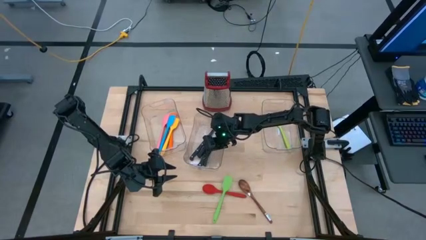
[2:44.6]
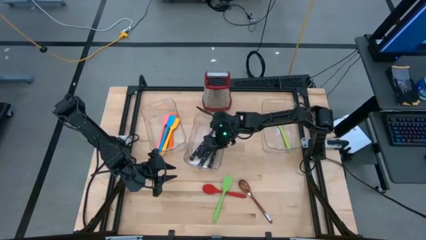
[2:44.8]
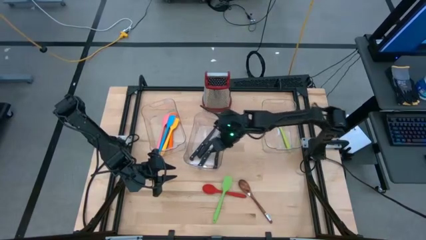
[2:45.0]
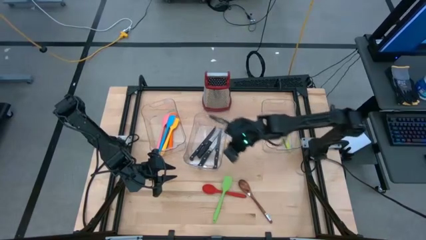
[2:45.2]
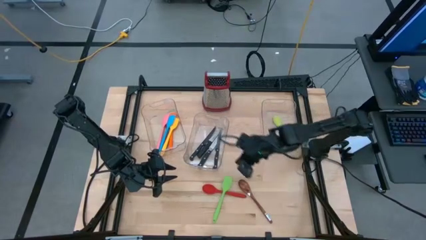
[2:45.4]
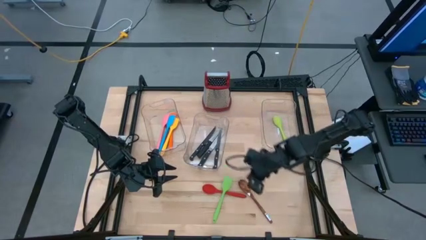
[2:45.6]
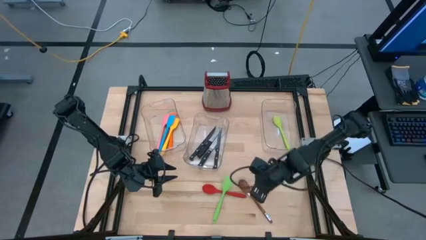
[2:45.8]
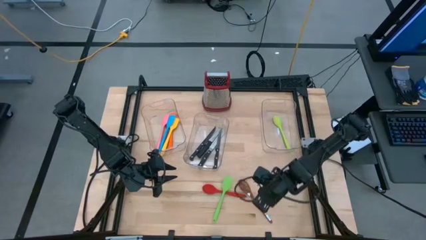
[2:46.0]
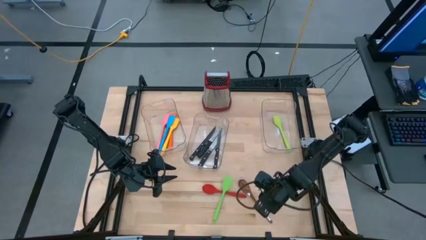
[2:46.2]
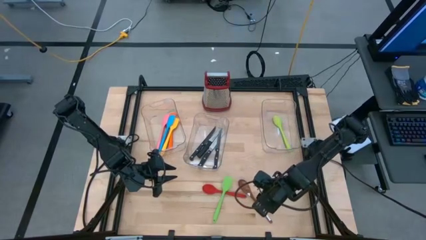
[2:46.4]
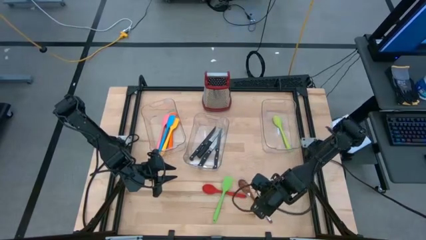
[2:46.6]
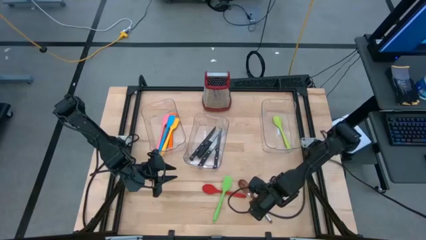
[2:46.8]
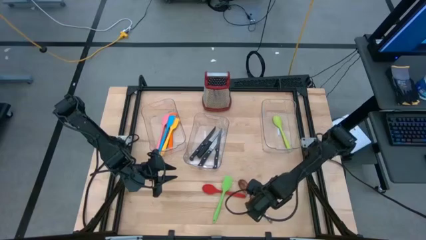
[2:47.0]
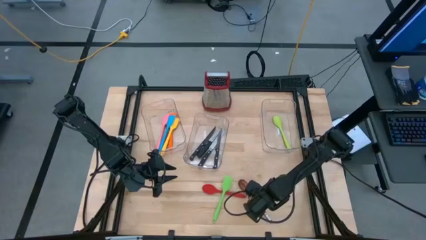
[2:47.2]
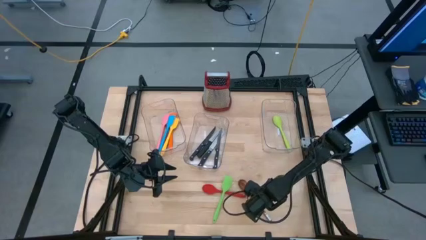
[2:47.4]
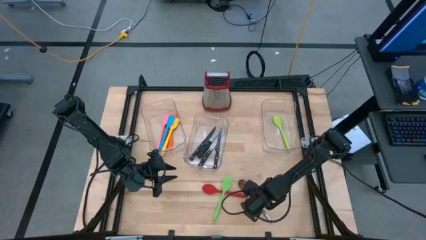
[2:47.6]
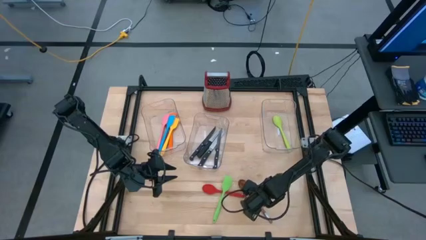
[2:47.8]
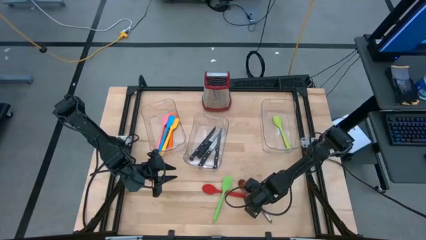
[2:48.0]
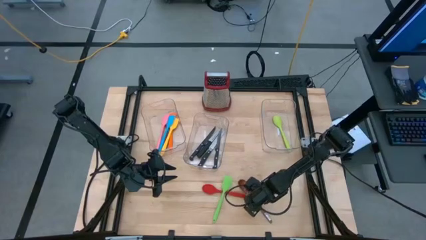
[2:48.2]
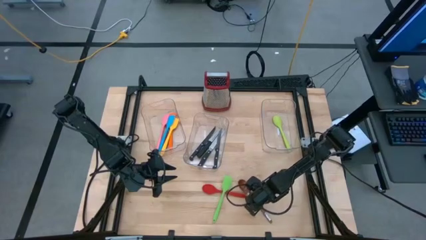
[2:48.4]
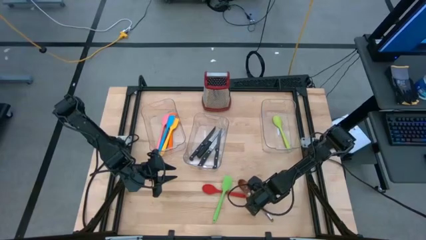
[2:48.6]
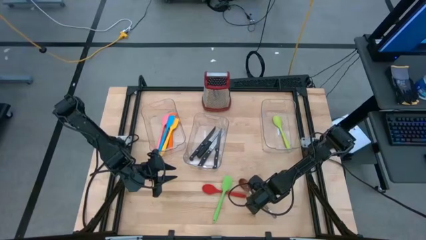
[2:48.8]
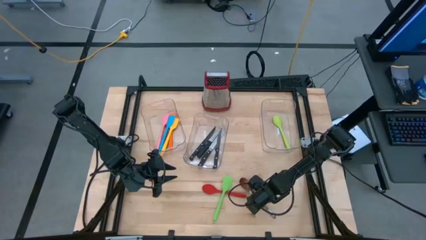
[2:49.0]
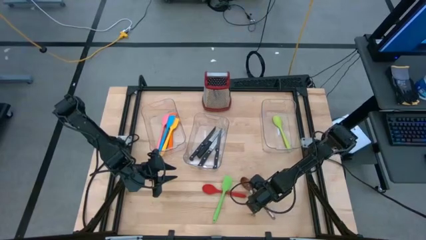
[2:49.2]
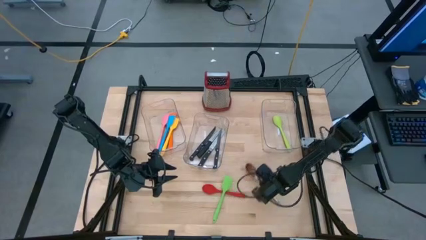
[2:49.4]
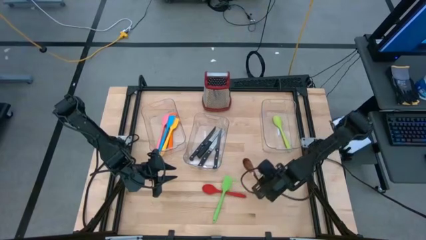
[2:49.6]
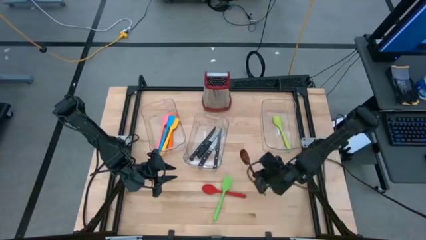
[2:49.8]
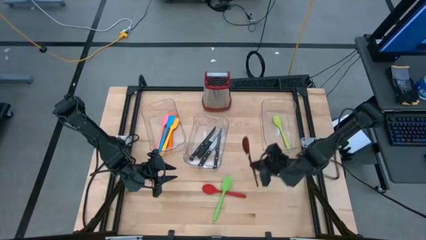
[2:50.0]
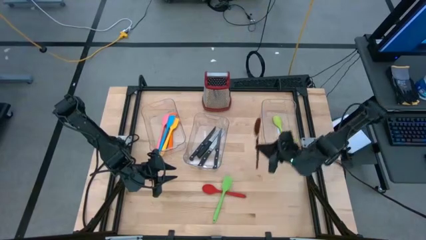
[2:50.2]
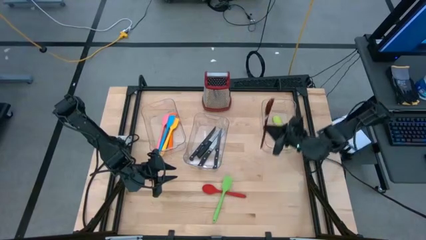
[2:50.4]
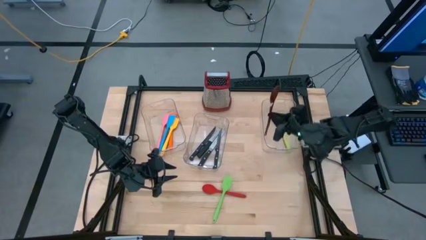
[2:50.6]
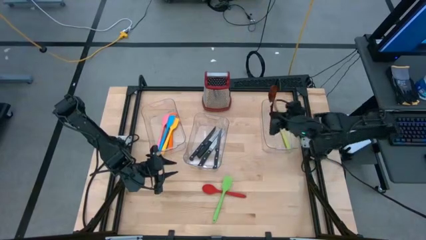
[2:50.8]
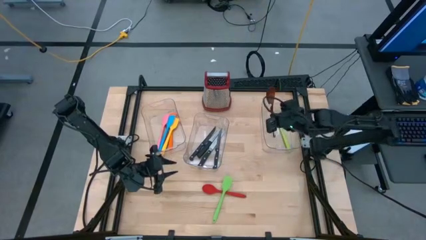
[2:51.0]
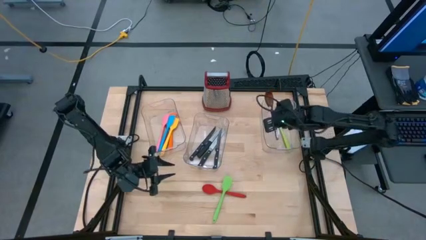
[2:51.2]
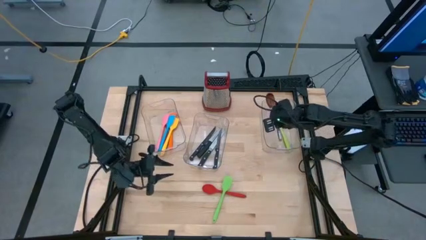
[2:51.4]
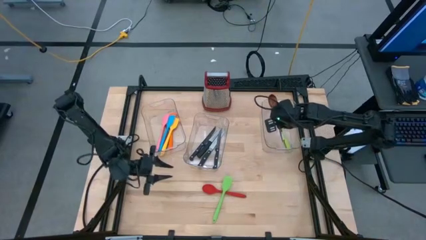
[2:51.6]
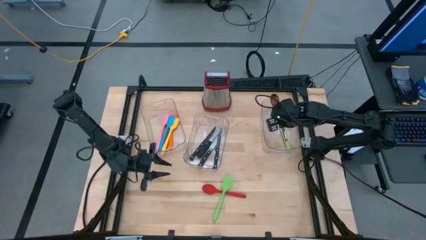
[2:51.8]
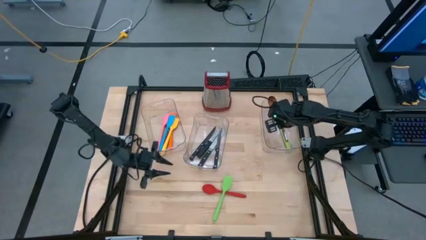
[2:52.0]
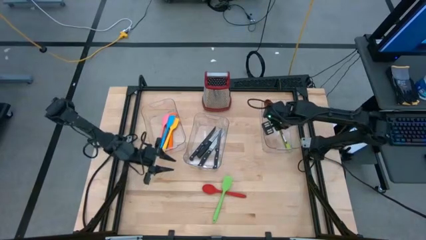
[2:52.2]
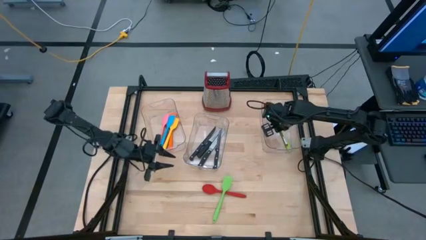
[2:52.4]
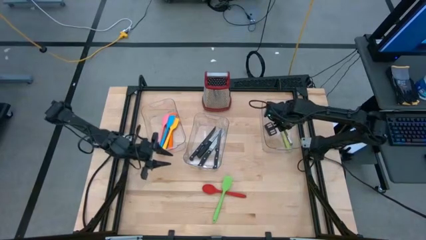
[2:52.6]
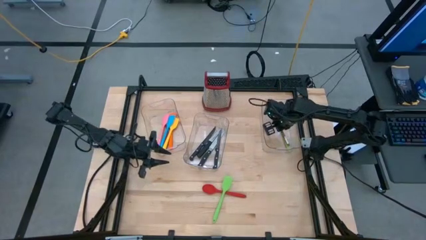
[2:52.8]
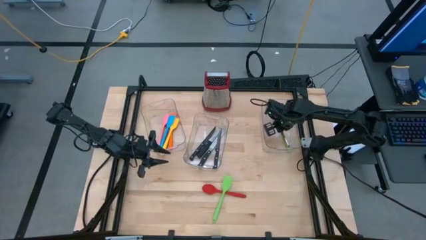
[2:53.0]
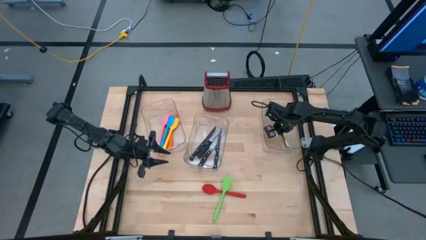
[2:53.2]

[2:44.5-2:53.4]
Task: Pick & Place Kitchen Items
Put the brown serving spoon into the right transparent bin

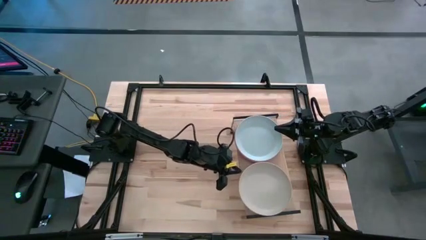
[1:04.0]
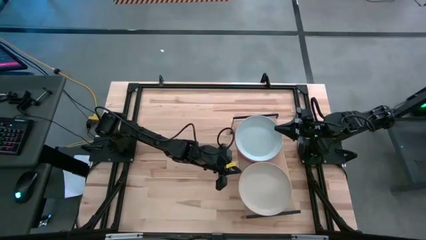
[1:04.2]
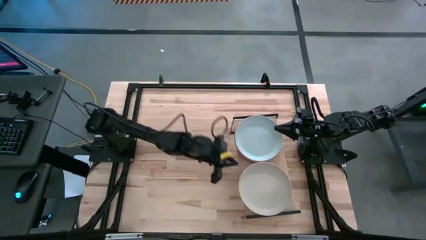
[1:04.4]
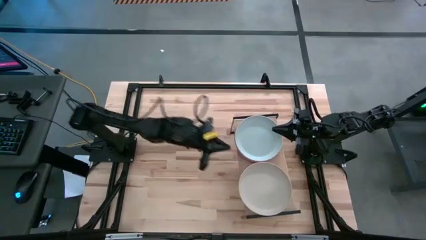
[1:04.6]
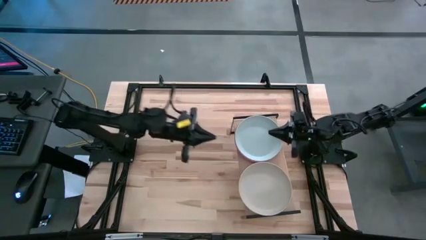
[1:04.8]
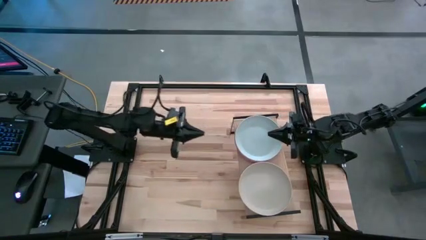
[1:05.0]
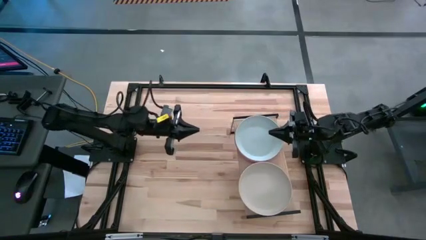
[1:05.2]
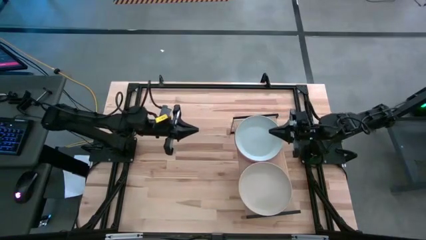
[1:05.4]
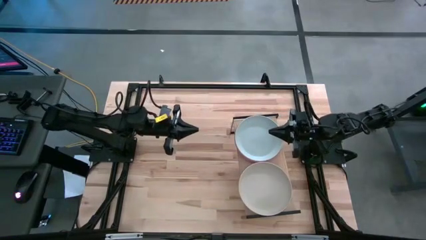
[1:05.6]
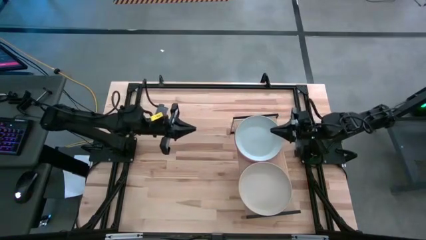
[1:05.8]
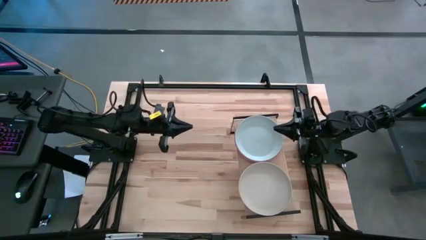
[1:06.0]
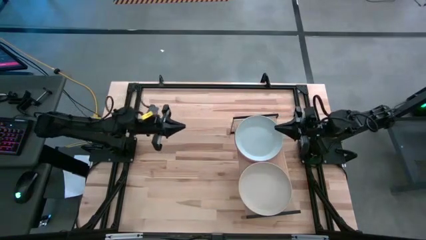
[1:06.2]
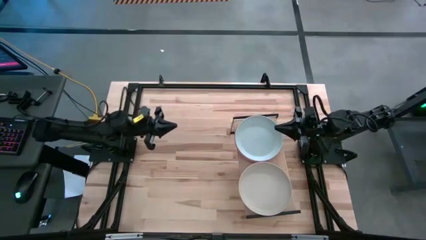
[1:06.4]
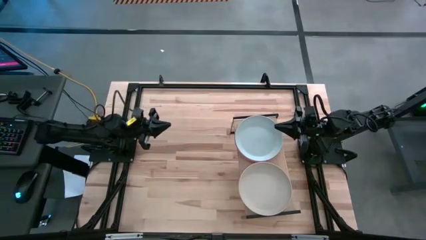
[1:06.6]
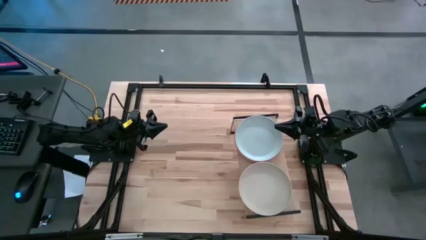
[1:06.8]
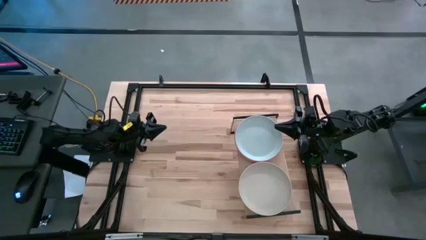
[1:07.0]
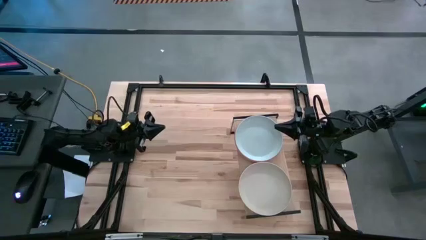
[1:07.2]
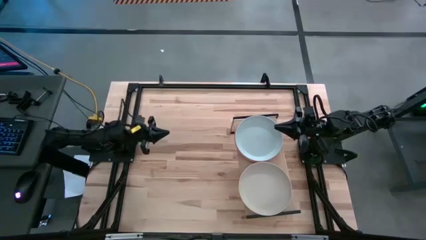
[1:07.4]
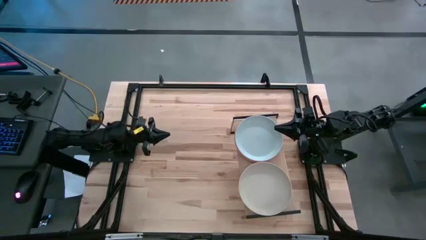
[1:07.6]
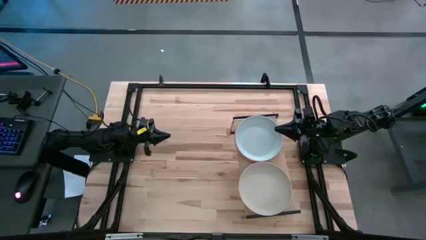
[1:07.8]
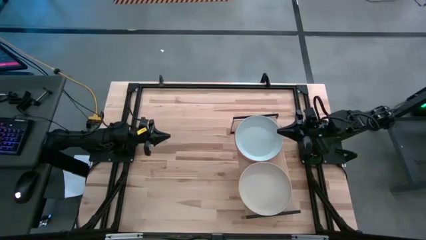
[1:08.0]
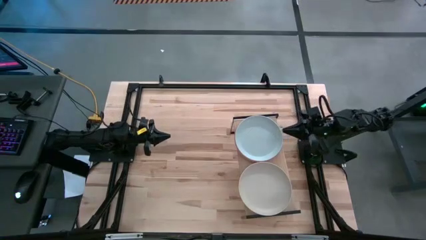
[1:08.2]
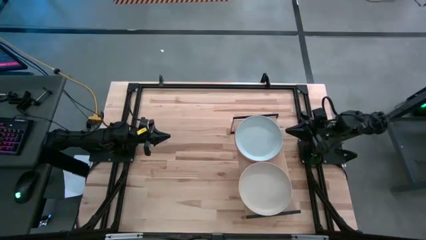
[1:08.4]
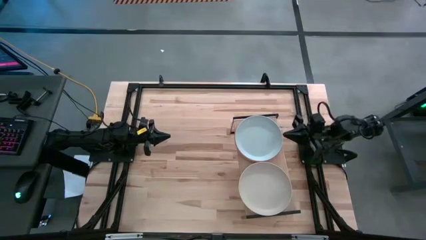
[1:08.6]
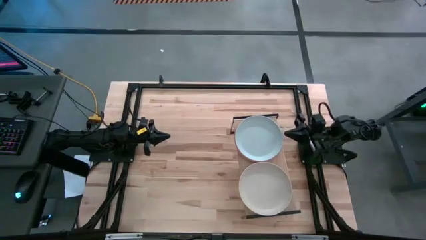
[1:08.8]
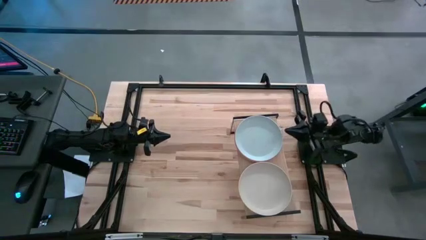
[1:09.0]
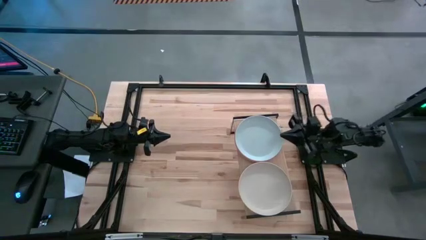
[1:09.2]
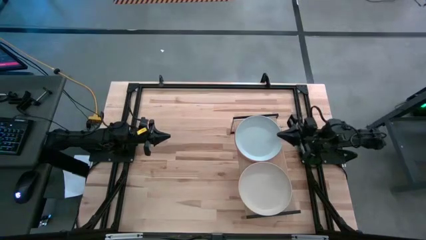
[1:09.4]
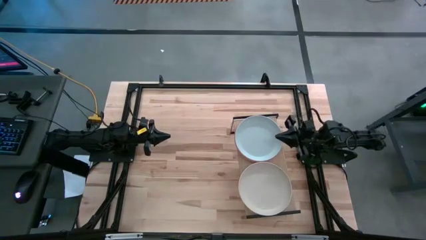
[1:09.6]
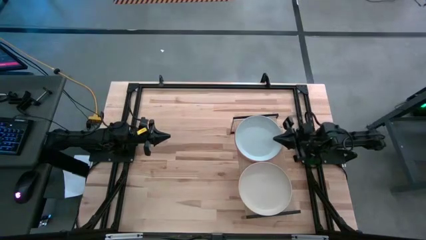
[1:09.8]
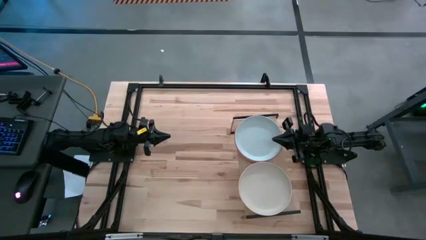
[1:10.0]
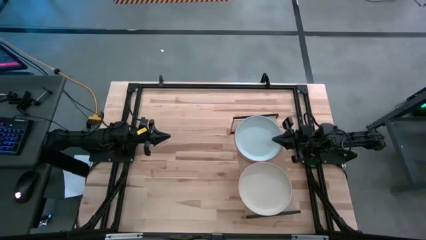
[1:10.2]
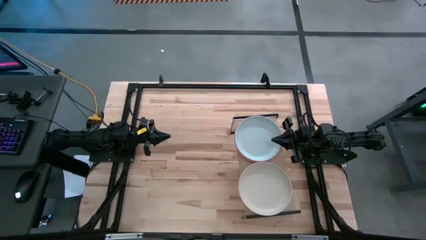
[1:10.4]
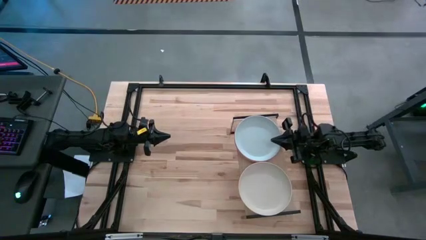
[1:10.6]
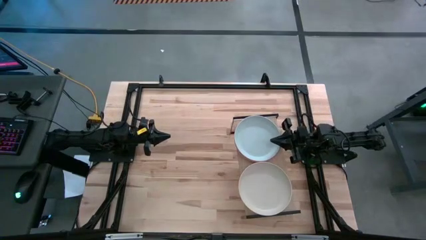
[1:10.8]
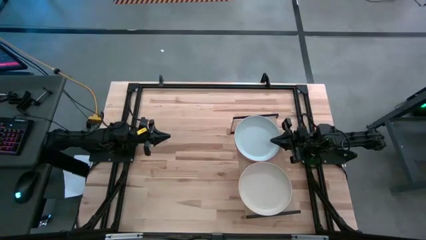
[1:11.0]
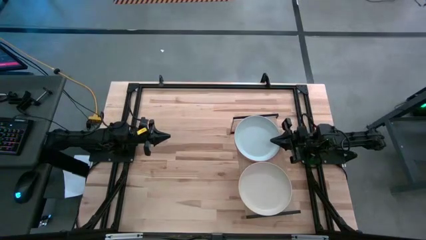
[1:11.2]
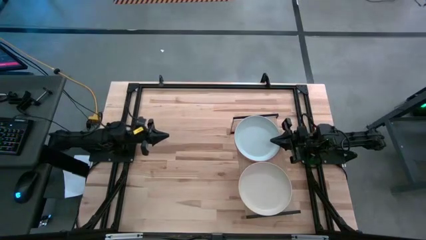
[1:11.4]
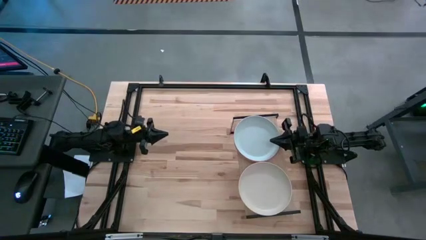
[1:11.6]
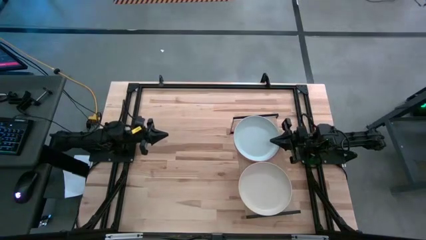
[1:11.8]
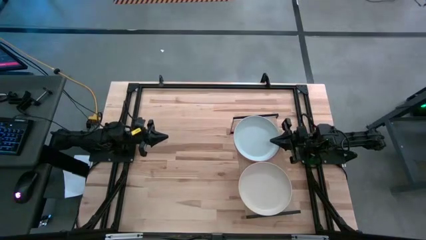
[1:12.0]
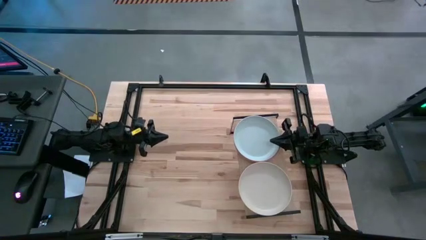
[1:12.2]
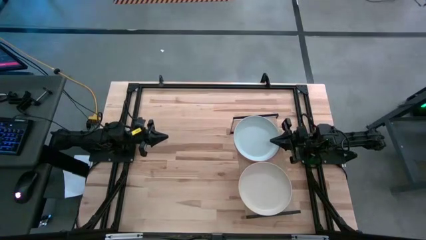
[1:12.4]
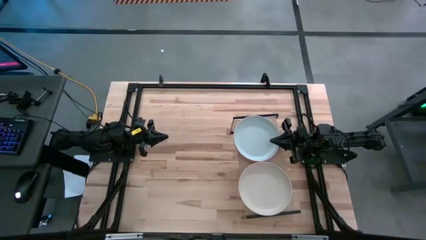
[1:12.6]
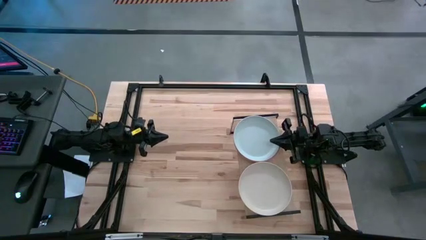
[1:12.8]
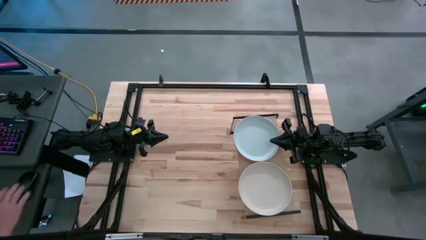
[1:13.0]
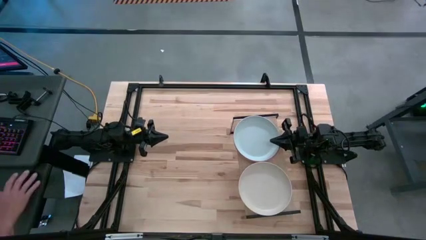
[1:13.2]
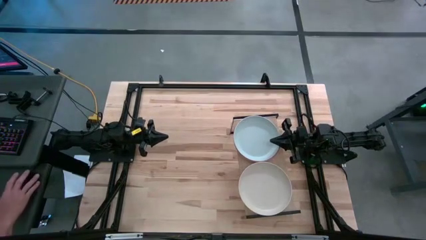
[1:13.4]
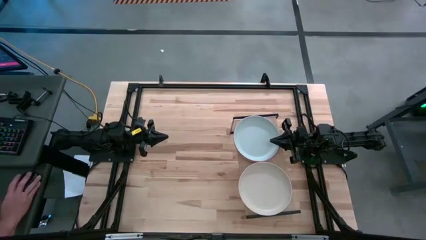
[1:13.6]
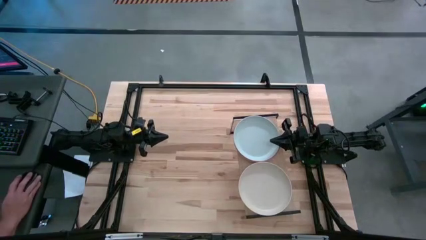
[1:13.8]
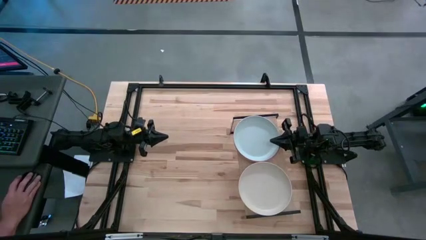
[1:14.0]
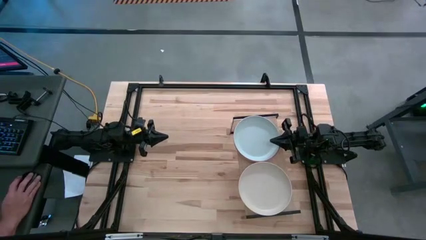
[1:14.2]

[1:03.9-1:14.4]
Task: Place and stack plates onto a shelf
Return to Home Position
